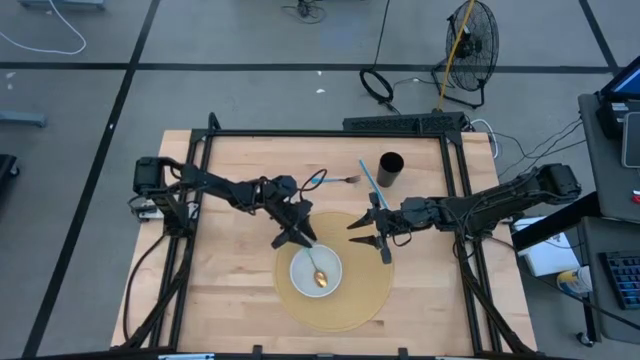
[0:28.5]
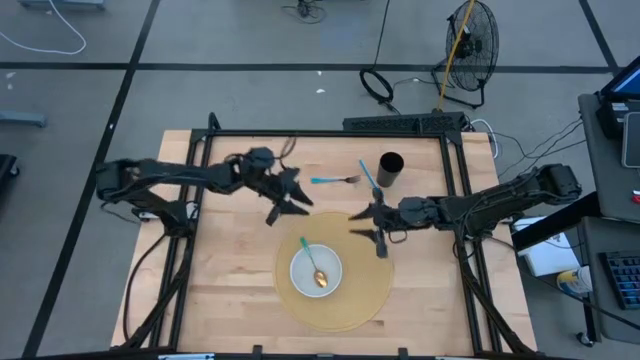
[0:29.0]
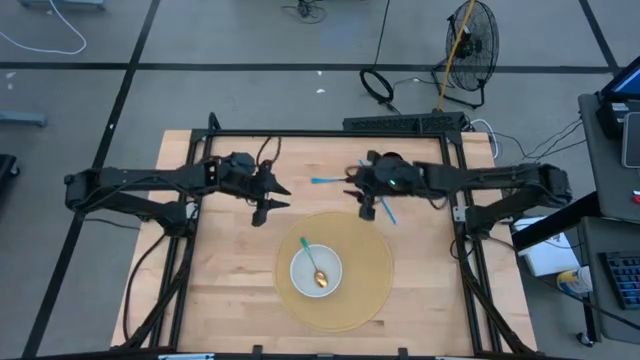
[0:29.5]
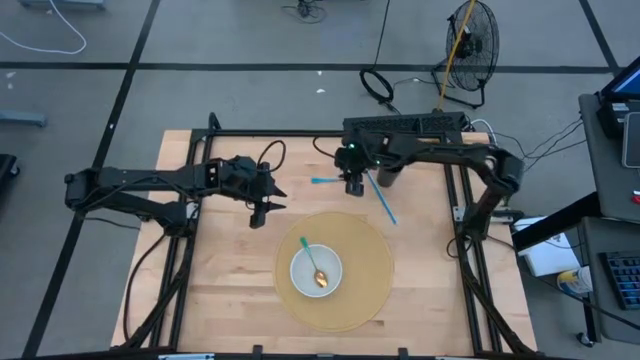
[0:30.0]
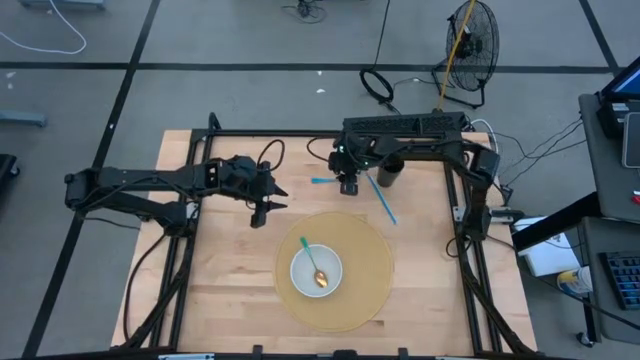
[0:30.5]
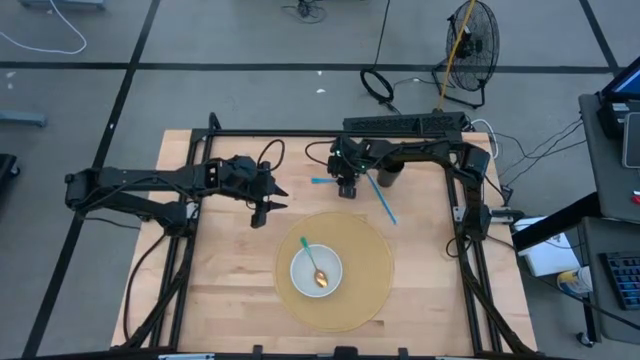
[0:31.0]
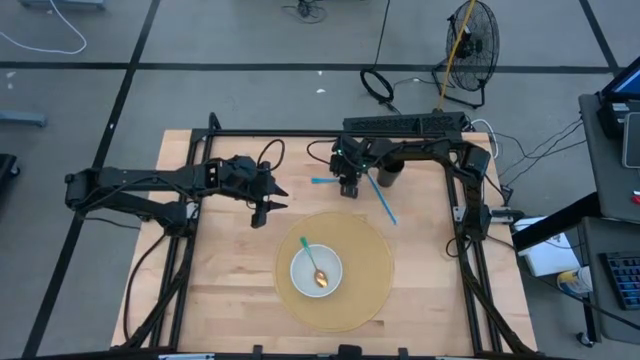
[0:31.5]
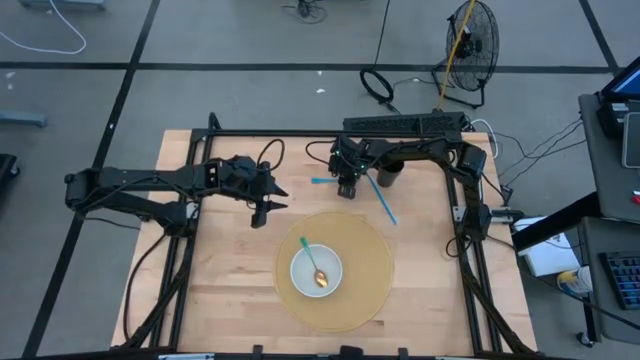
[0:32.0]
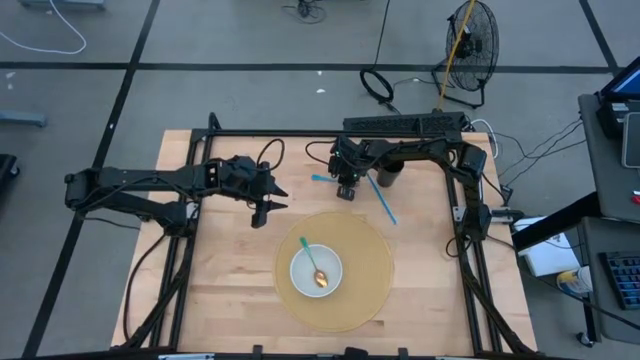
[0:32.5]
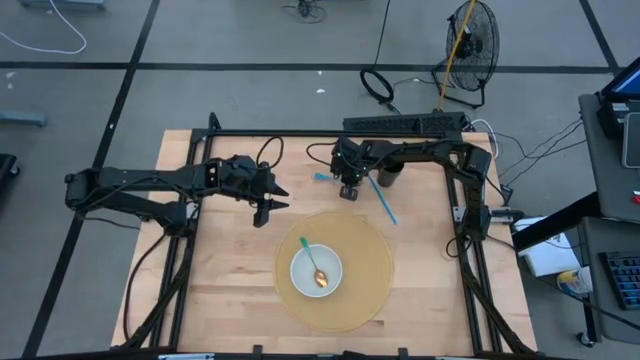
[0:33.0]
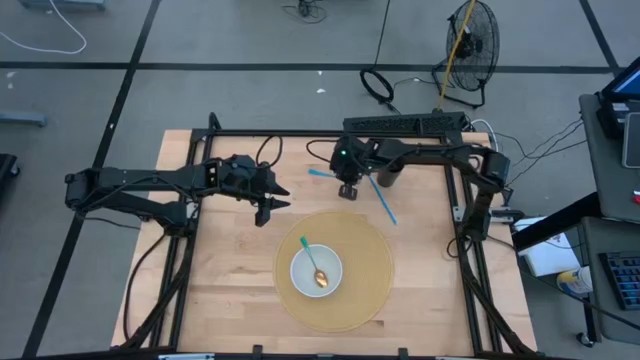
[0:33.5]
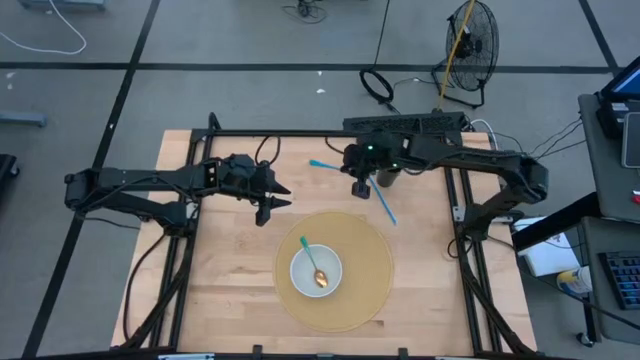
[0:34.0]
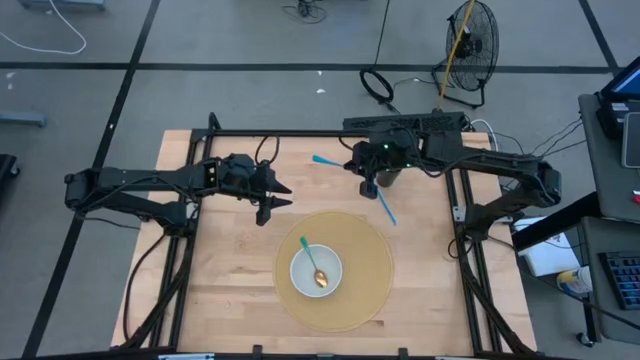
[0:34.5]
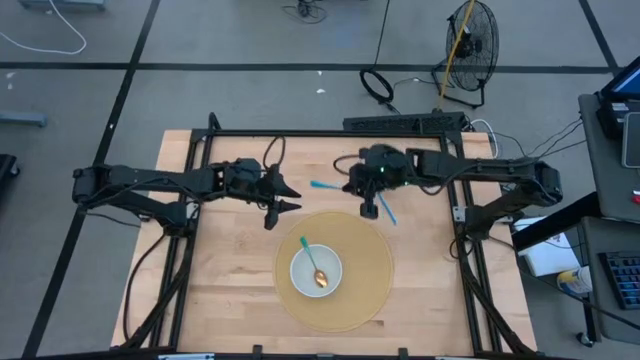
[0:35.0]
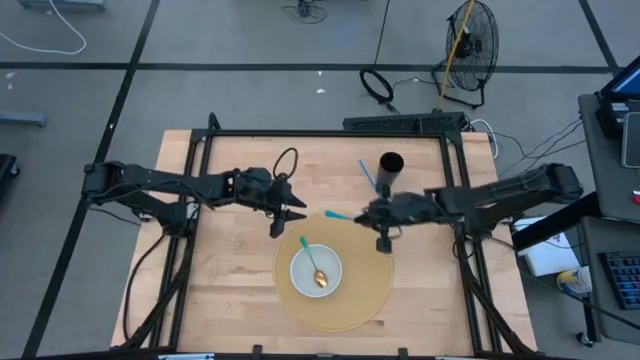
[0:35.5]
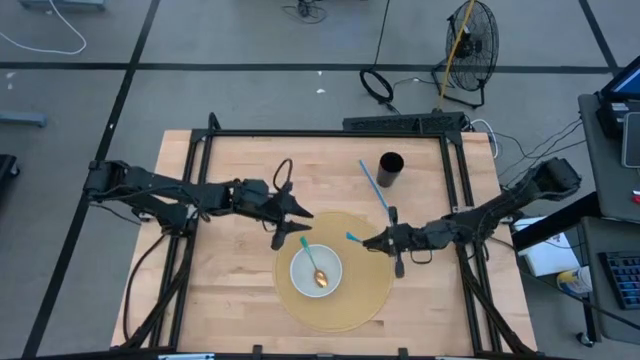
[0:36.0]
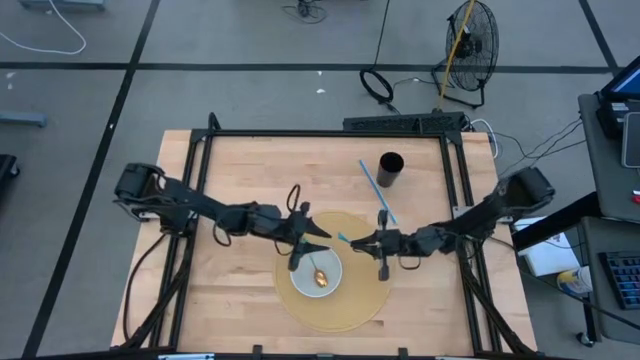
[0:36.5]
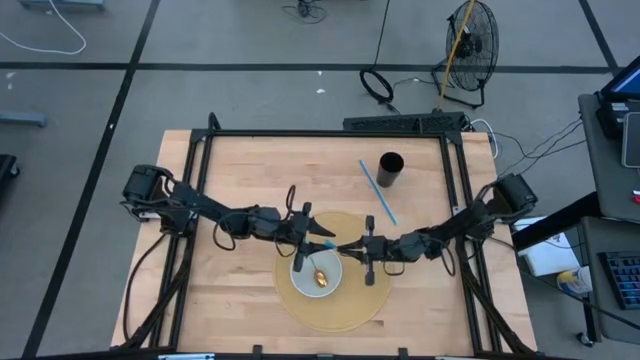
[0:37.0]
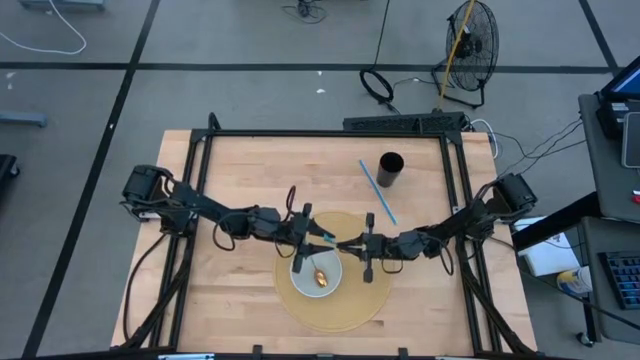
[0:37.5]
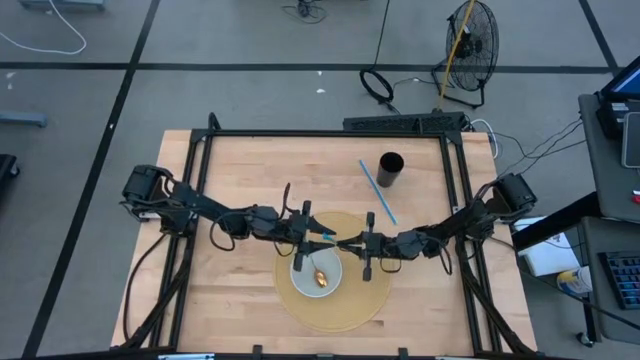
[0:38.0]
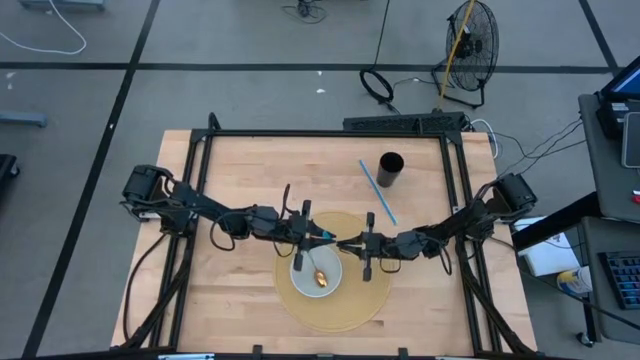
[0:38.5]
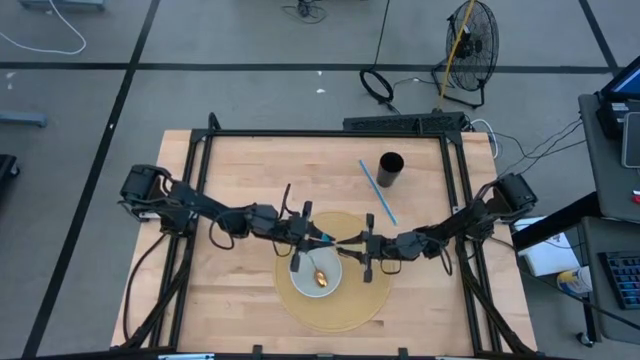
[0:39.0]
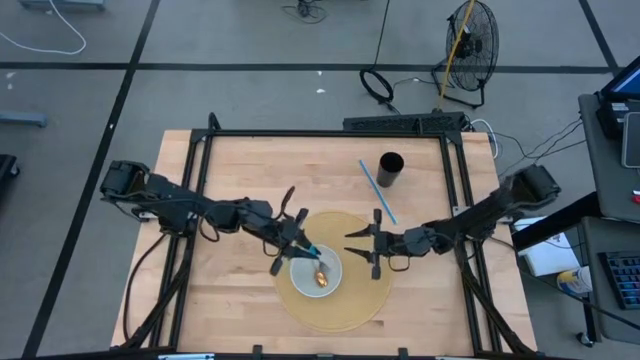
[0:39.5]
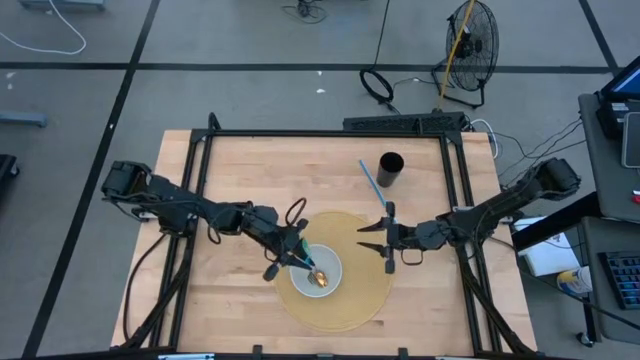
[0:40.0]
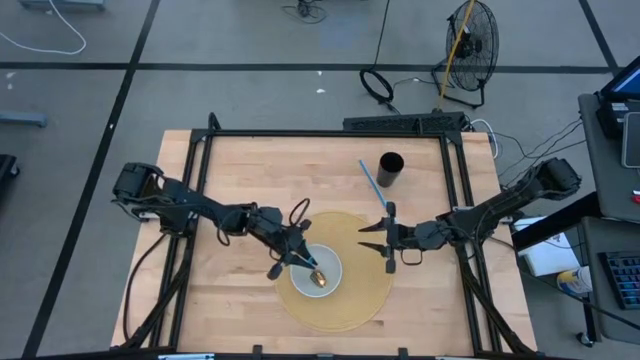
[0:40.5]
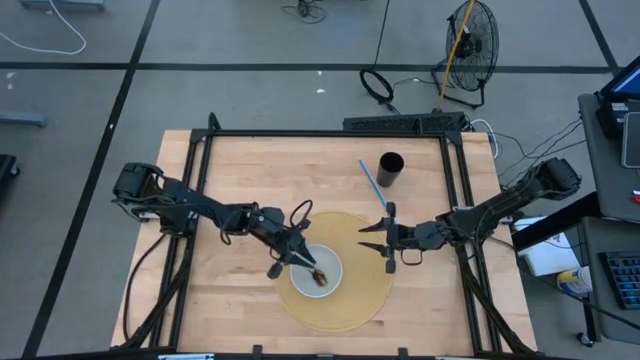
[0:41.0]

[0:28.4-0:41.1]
Task: Pick & Place Utensil
Put the blue fork into the white bowl

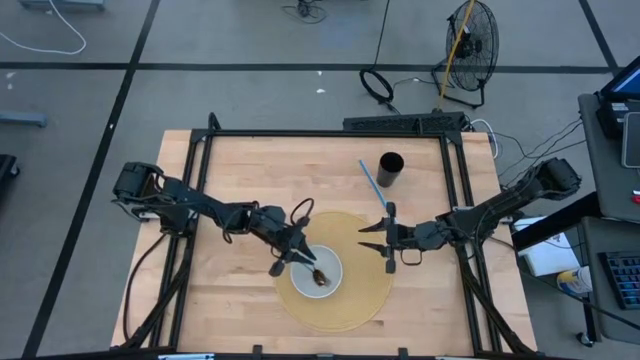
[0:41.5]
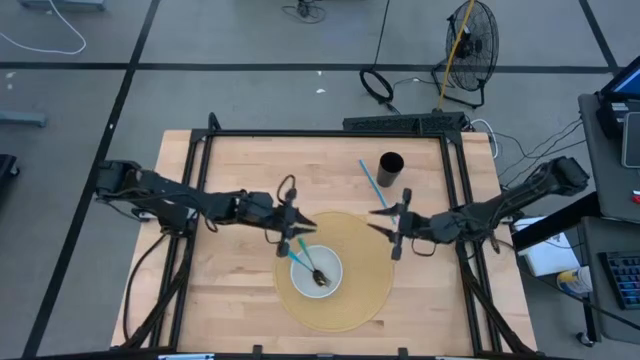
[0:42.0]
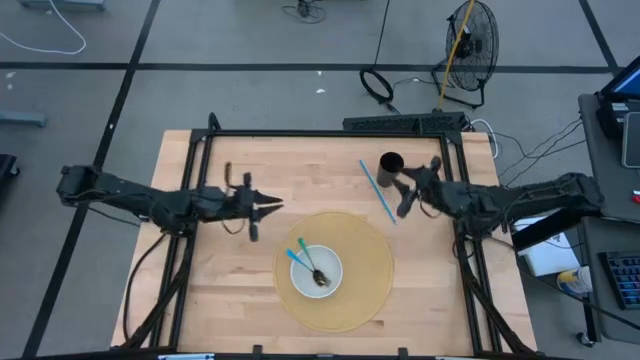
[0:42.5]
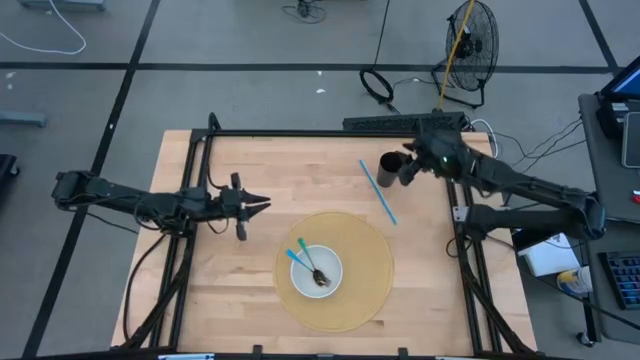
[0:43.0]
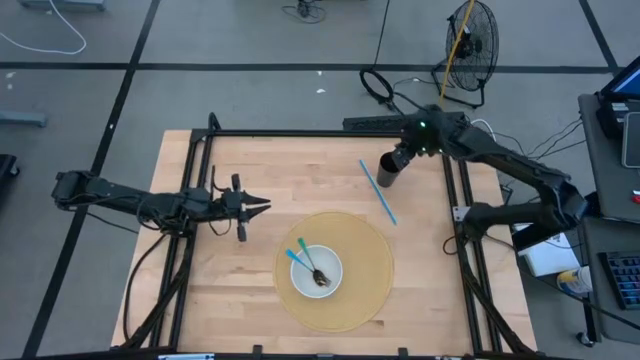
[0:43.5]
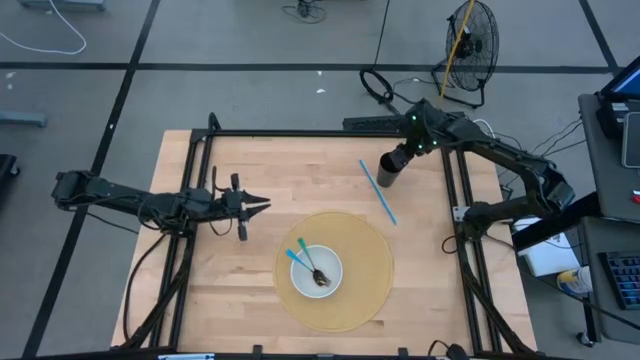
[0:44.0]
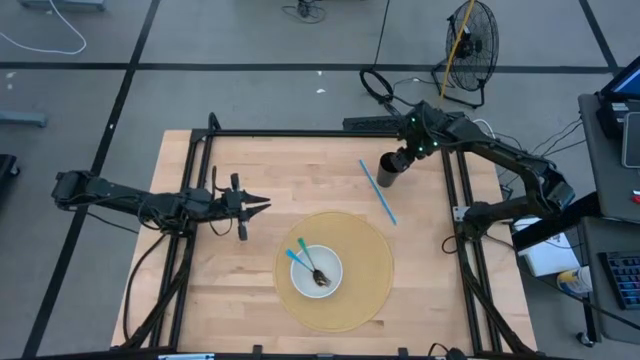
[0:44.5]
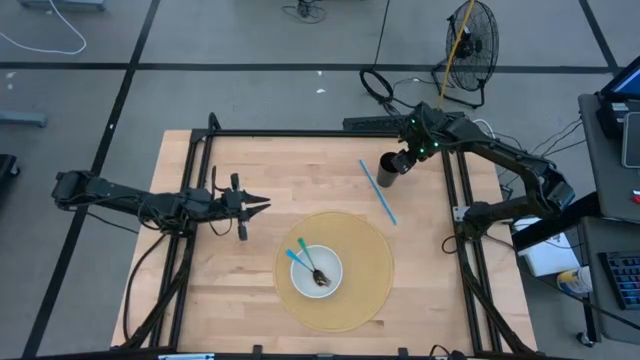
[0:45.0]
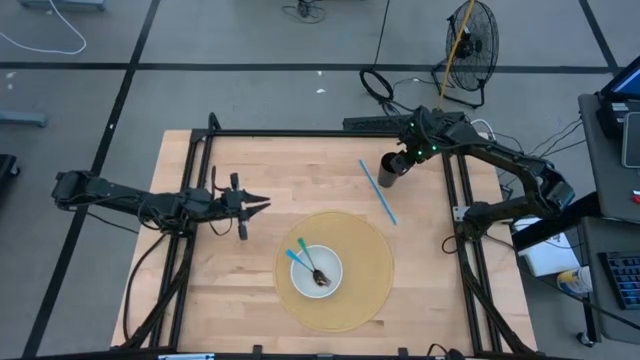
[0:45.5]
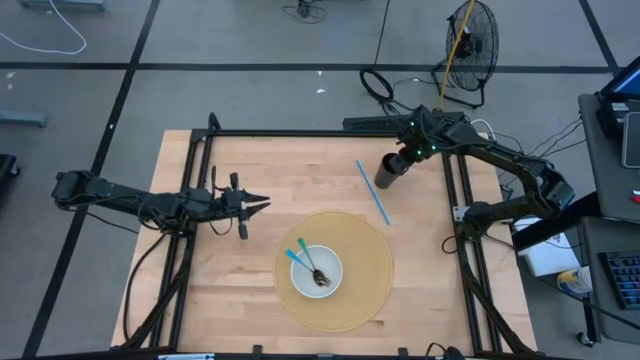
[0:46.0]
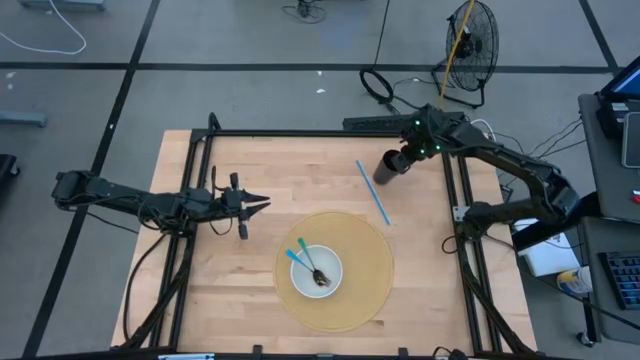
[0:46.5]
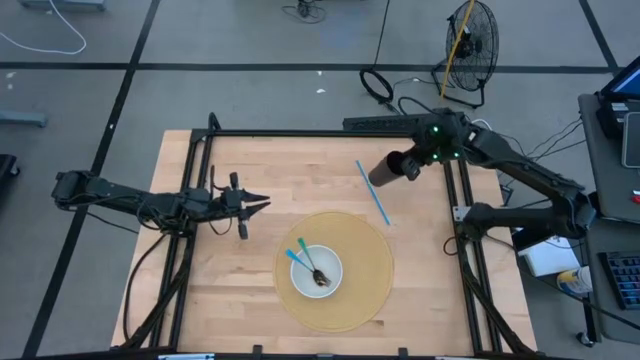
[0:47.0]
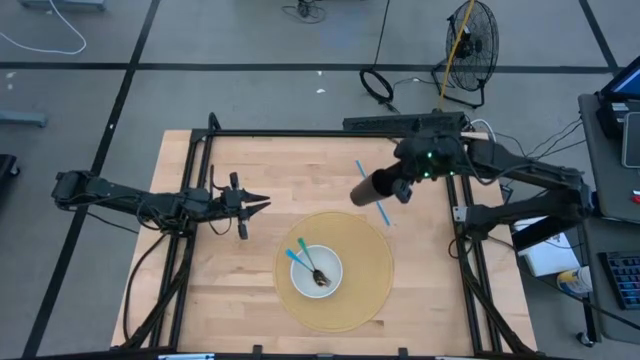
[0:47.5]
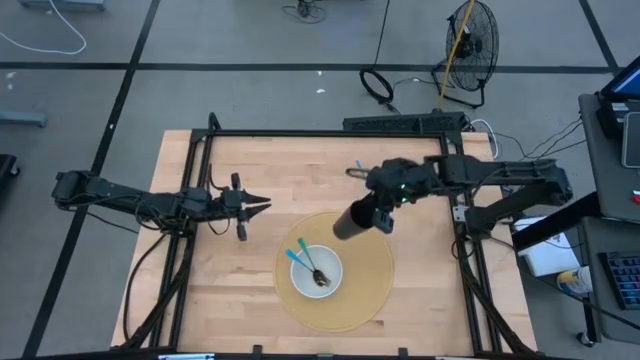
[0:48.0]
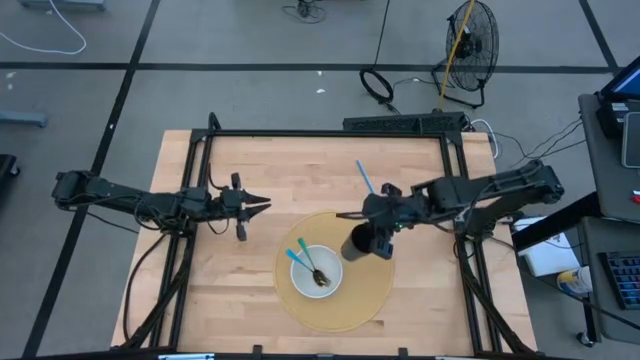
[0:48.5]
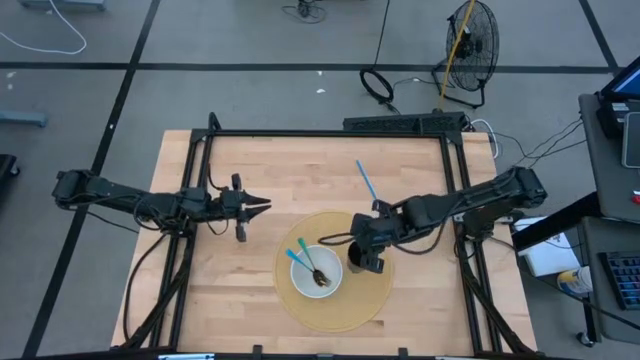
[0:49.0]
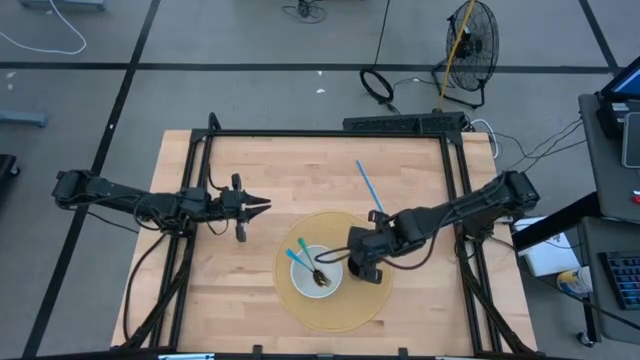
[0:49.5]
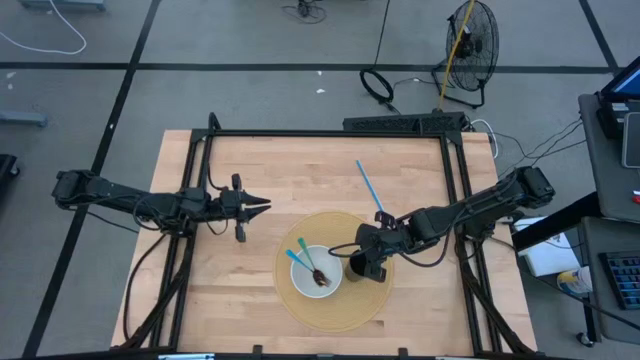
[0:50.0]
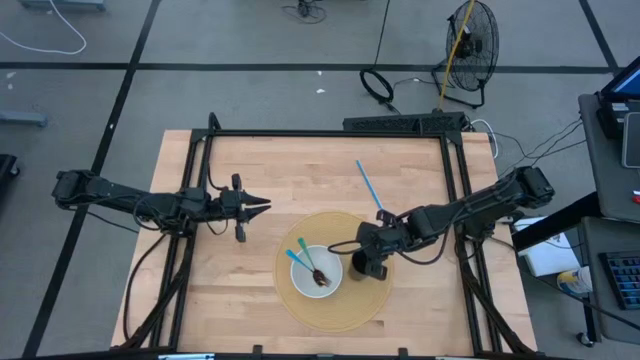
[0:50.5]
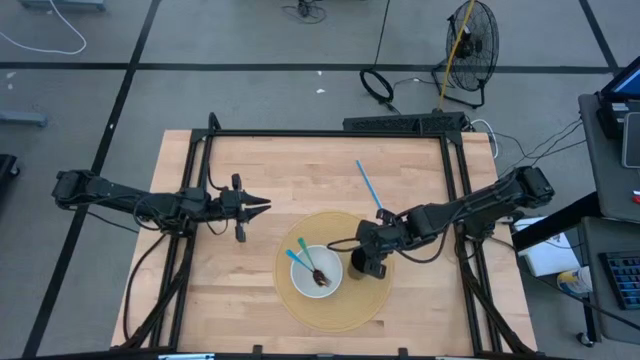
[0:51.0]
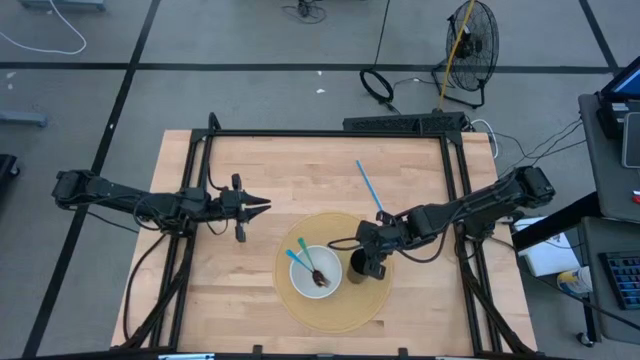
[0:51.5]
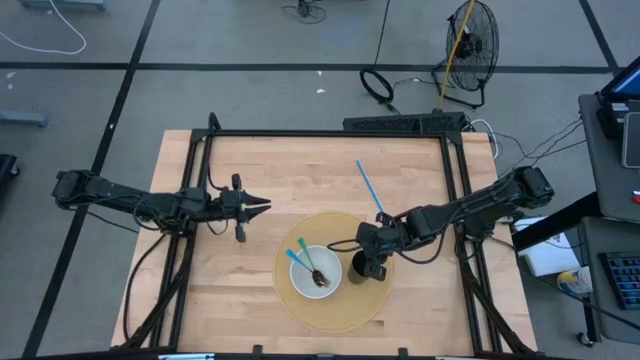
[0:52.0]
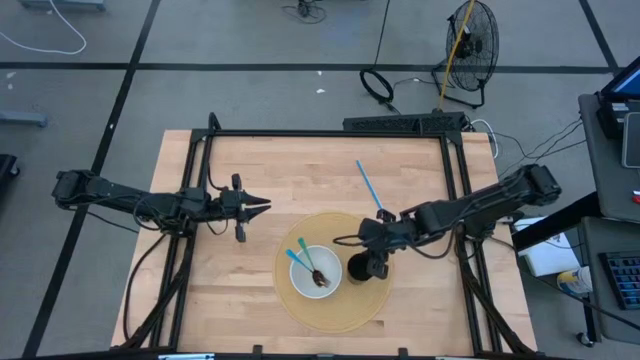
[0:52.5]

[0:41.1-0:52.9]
Put the black cup to the right of the white bowl on the tablemat
